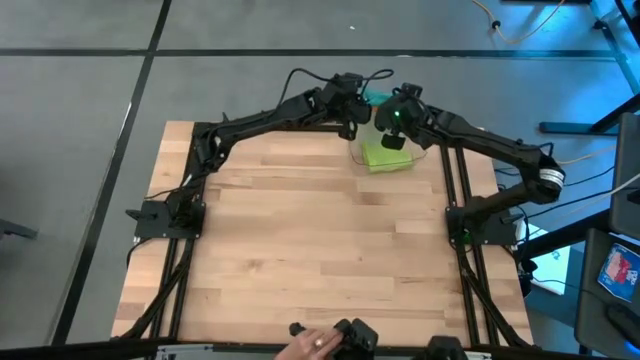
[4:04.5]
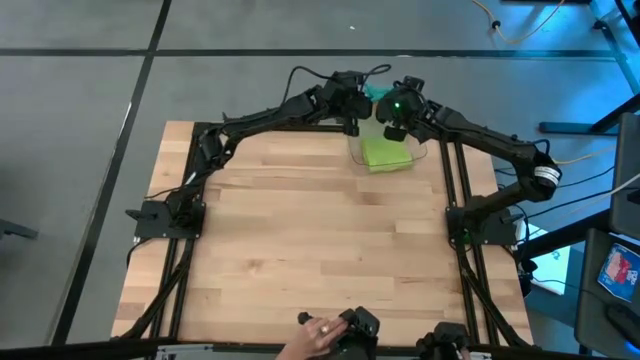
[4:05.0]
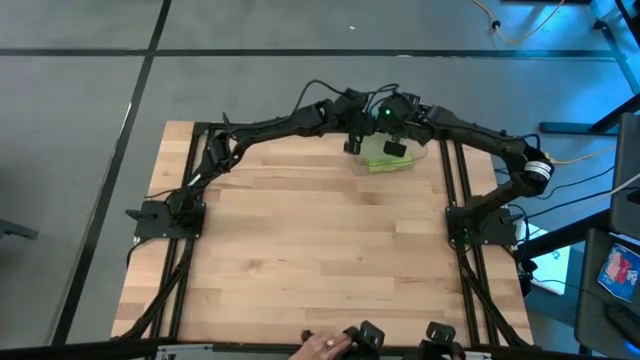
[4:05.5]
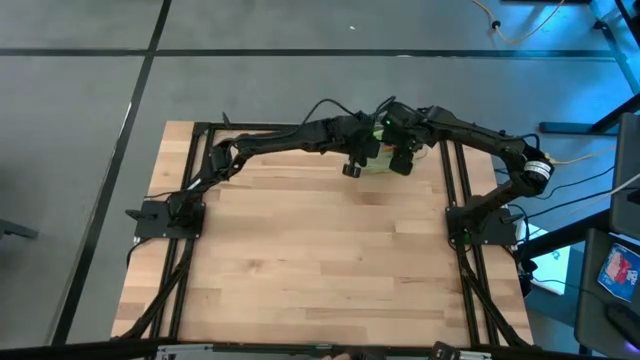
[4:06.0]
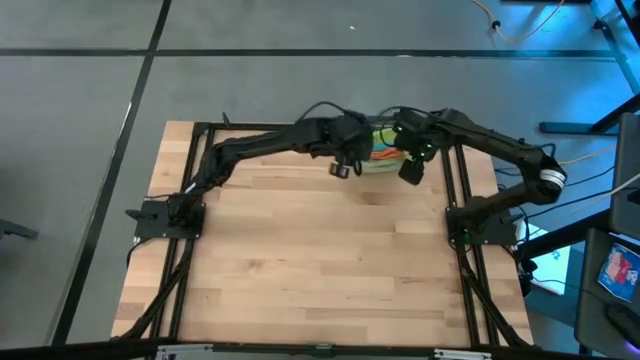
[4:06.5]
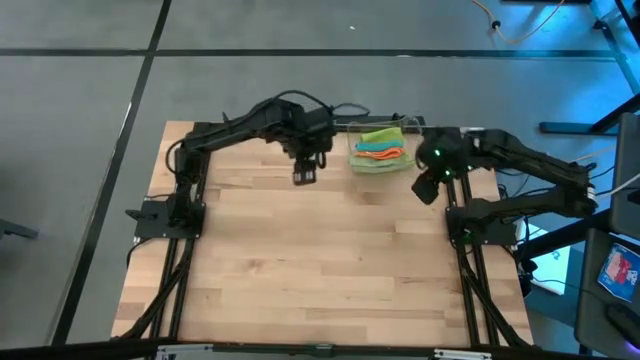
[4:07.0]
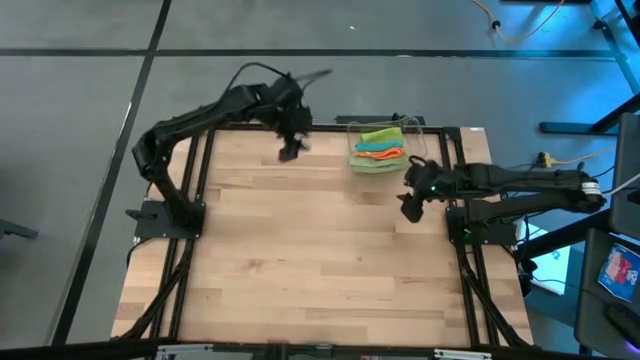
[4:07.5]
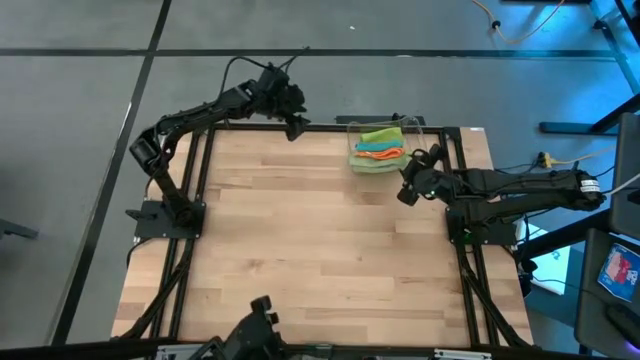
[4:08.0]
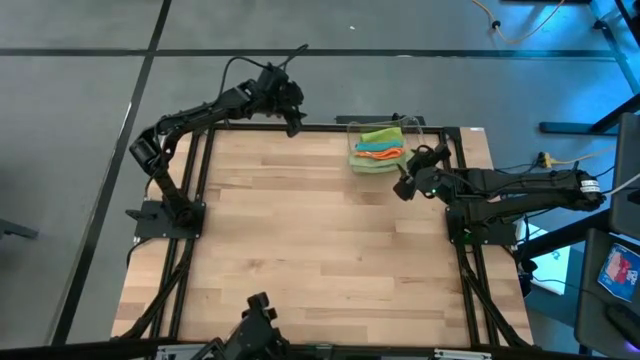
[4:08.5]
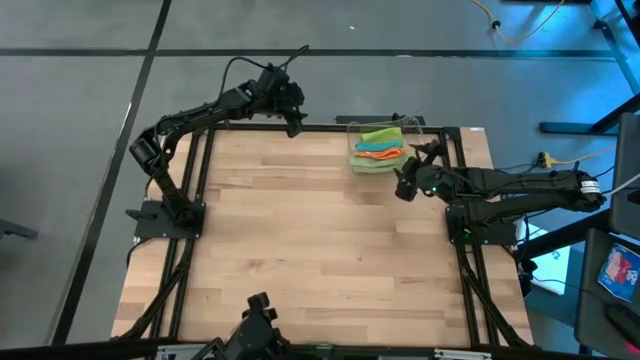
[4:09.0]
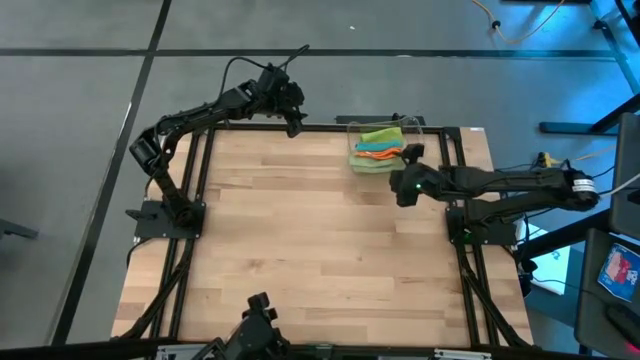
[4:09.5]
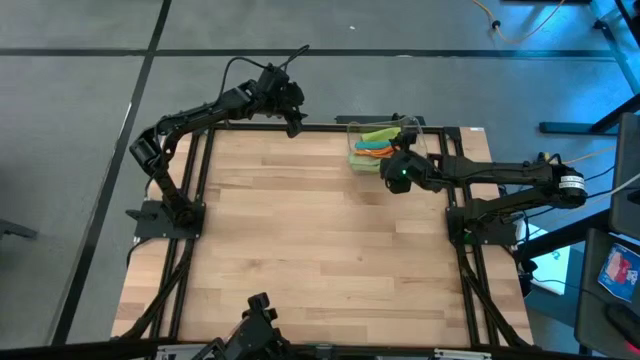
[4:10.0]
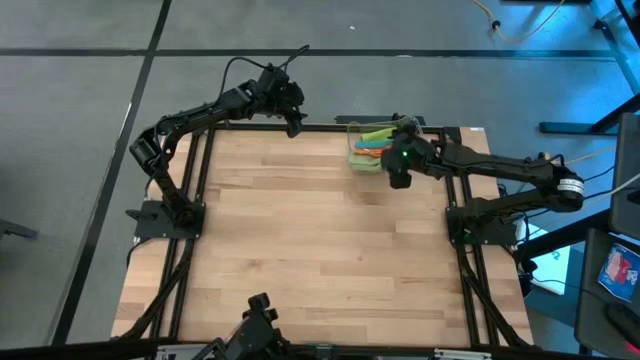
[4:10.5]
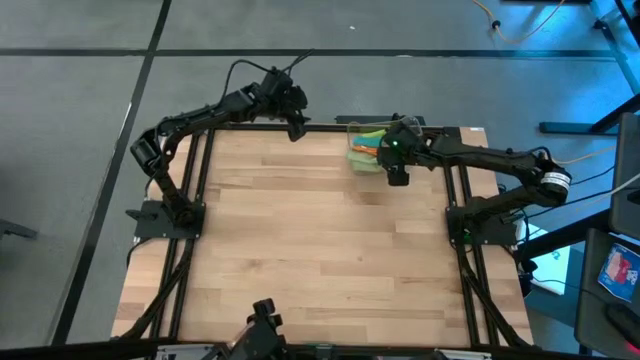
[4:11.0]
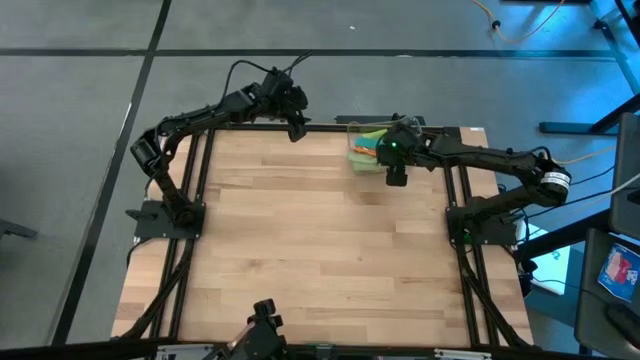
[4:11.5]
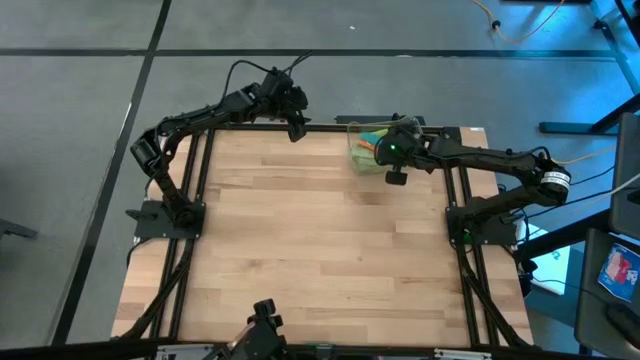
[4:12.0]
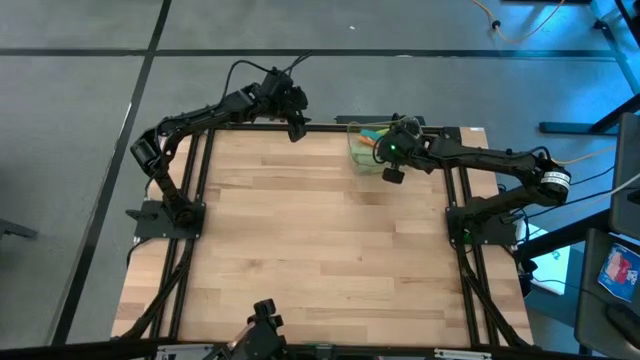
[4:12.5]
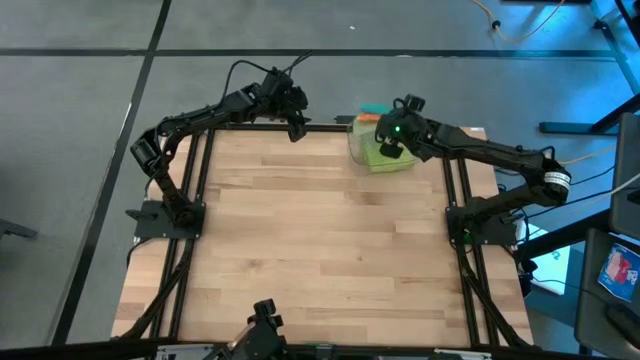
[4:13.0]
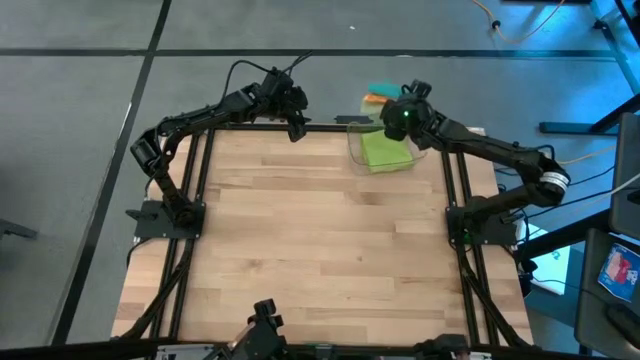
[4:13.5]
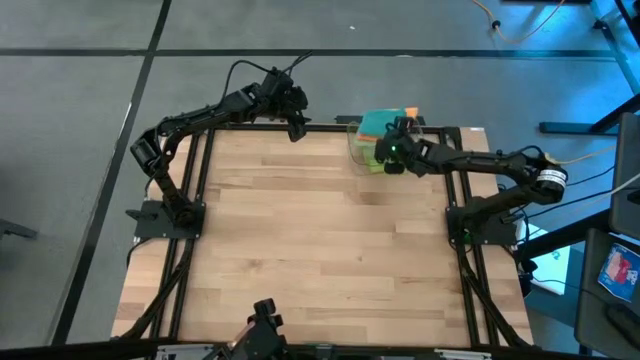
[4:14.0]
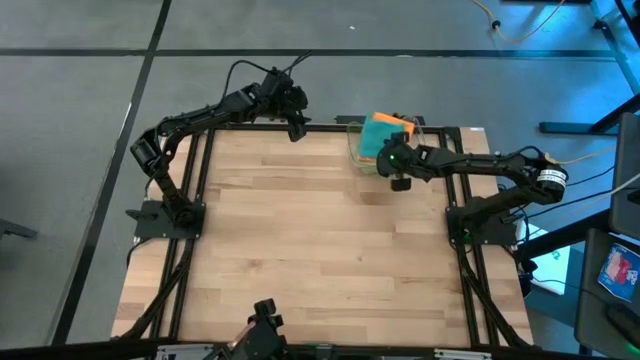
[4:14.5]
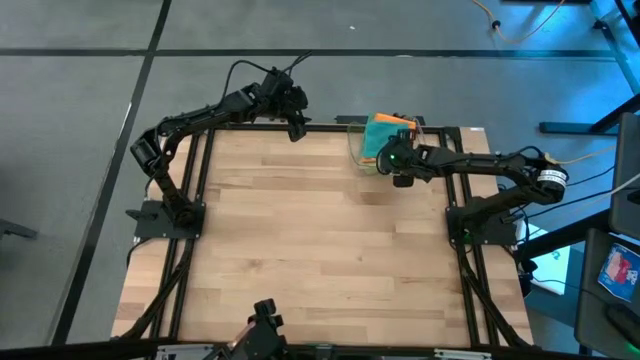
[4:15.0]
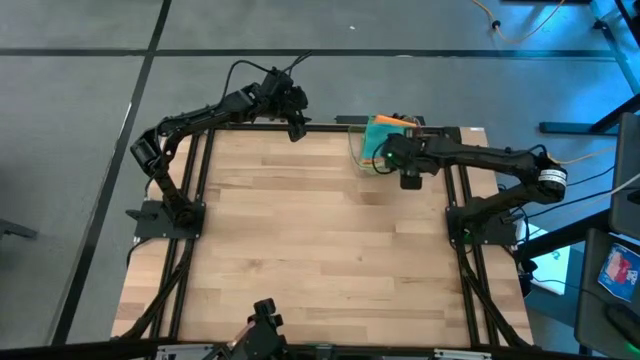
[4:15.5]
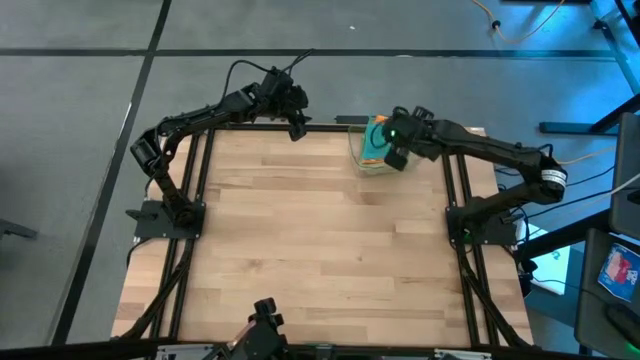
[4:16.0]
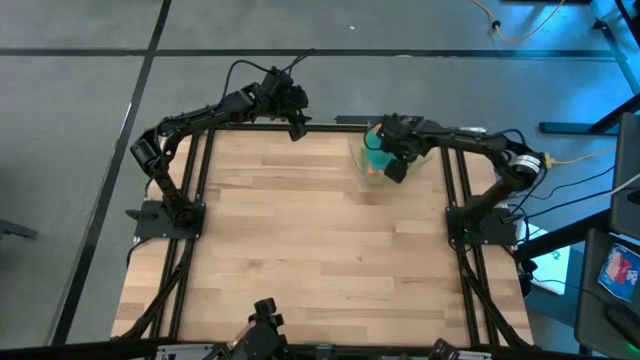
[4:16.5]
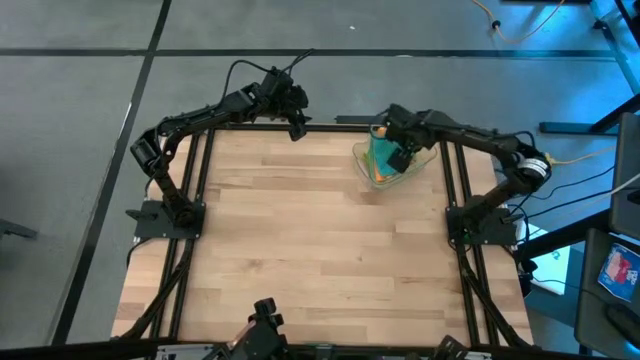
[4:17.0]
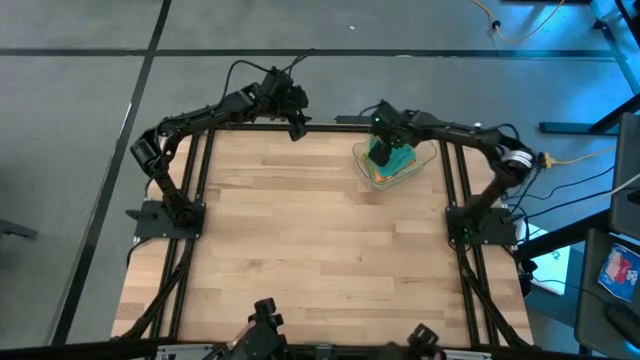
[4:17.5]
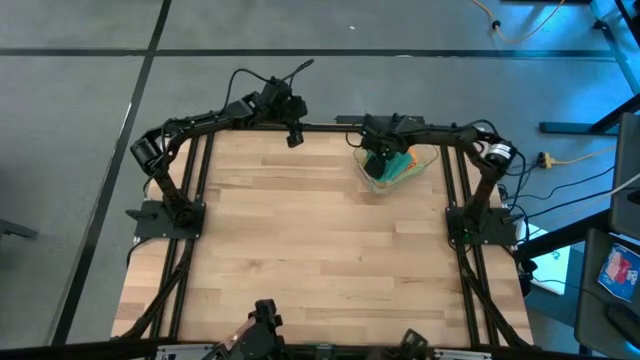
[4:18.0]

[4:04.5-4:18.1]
Task: Fold microfiber towels
Put the pile of microfiber towels into the transparent bin

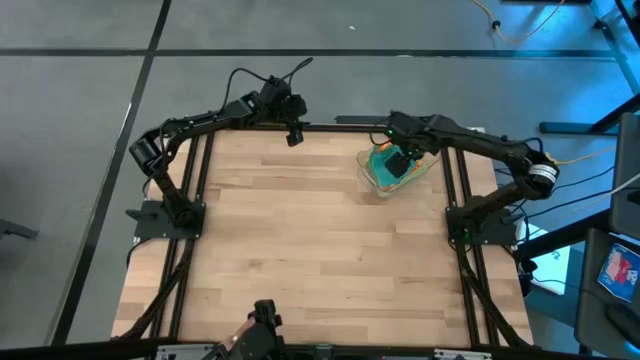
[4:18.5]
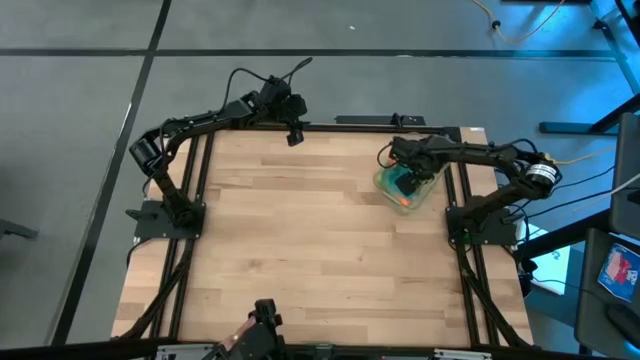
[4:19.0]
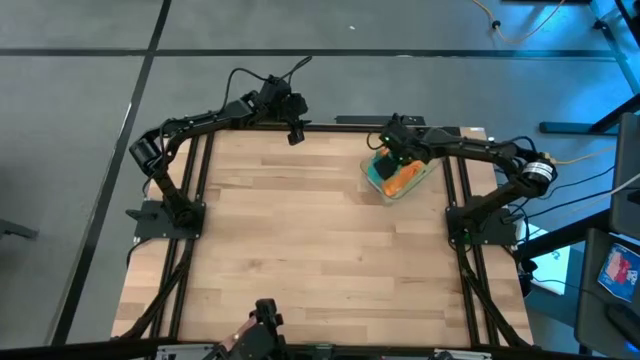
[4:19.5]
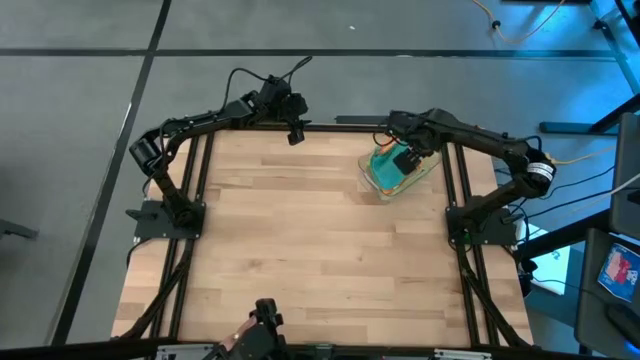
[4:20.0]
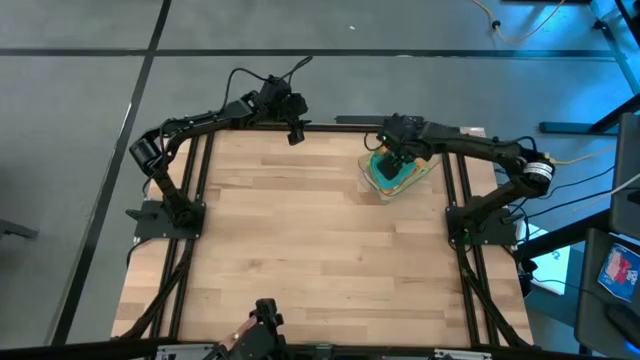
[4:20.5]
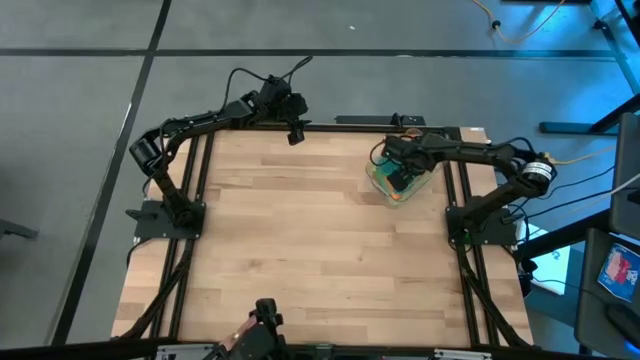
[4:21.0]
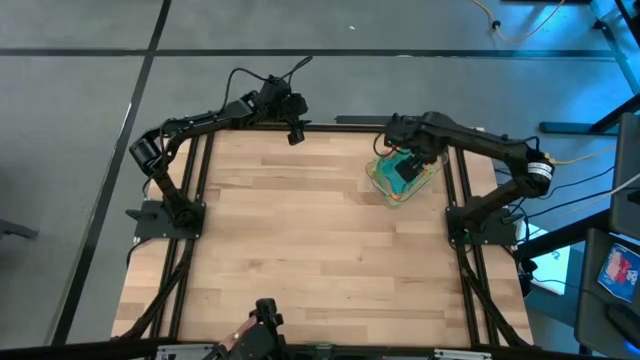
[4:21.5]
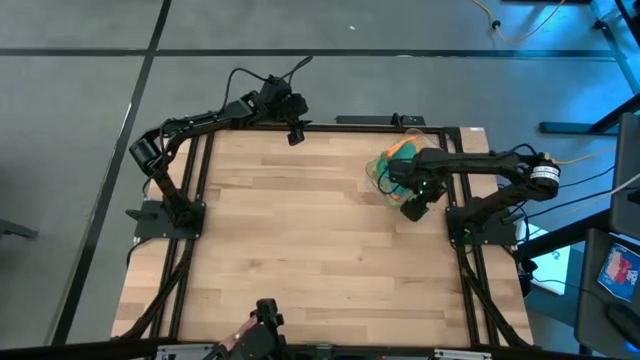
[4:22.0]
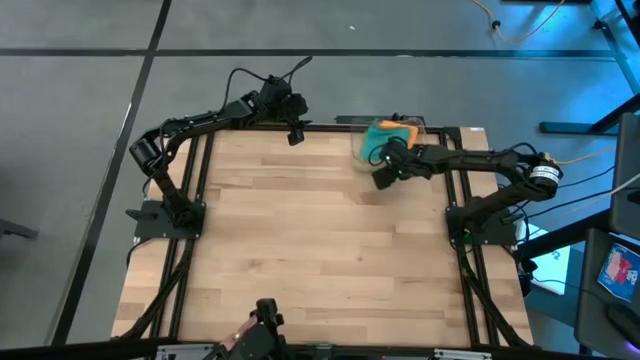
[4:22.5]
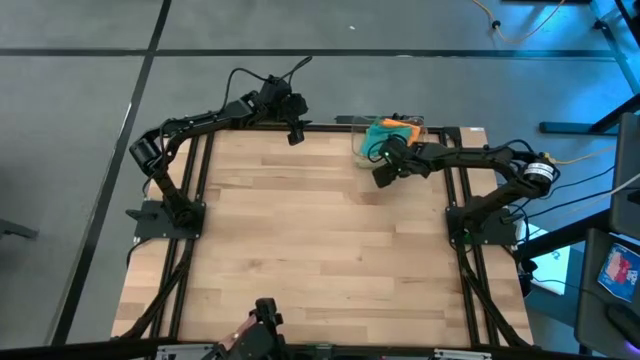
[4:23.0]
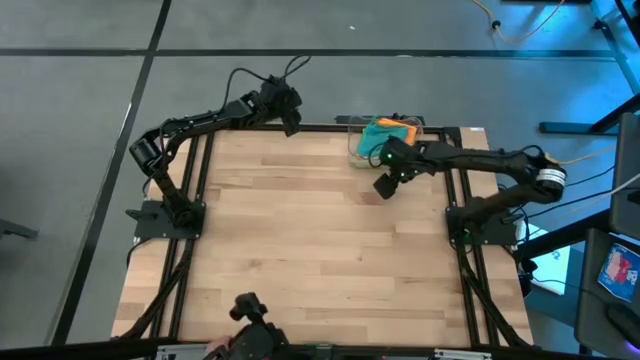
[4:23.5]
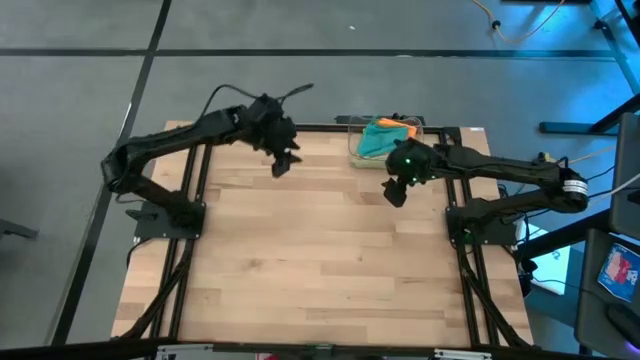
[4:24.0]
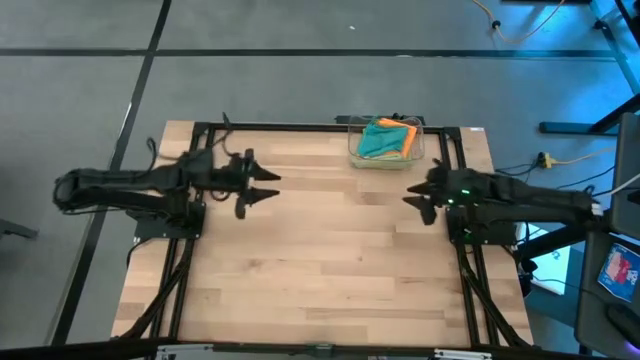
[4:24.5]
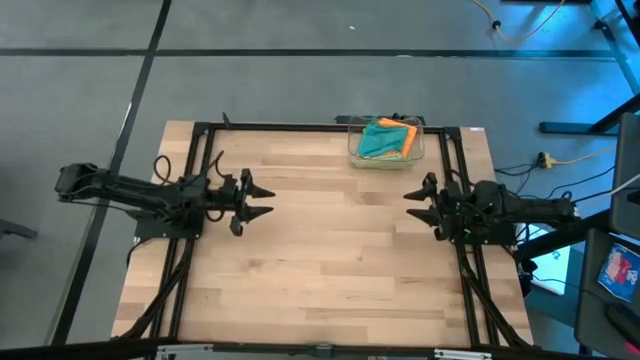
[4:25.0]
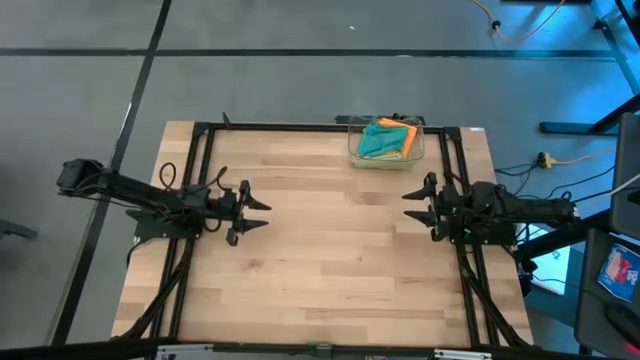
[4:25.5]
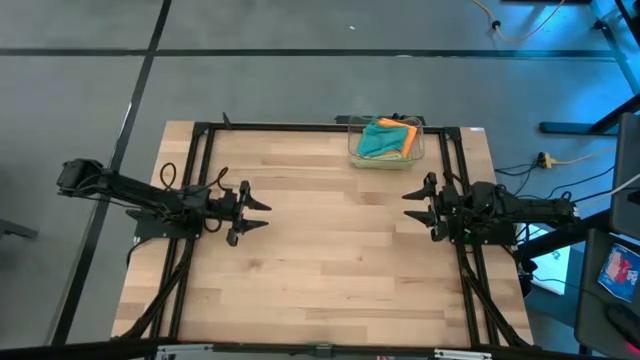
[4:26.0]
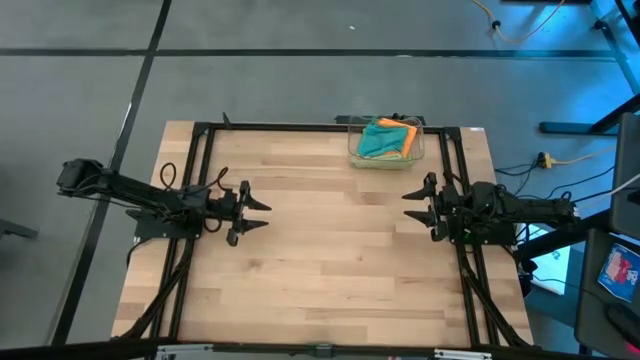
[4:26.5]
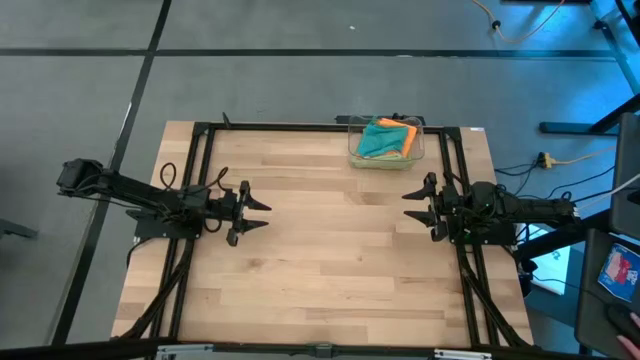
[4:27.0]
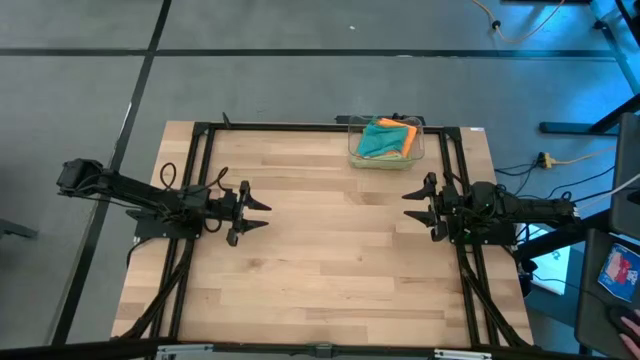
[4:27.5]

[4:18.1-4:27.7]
Return to Home Position
